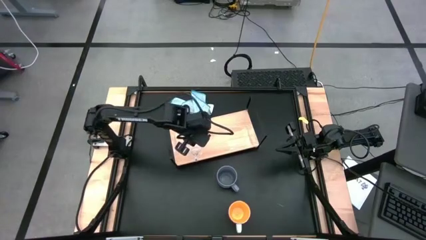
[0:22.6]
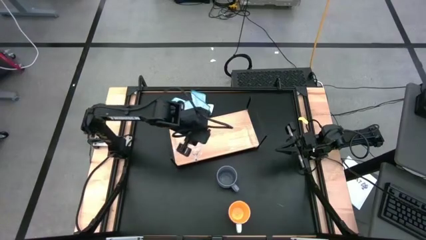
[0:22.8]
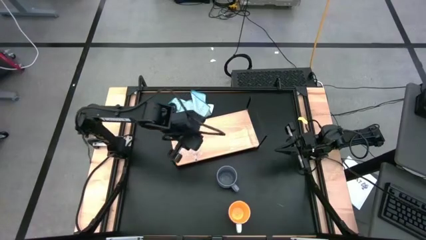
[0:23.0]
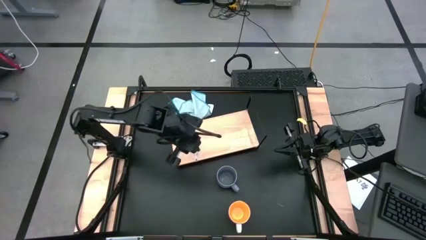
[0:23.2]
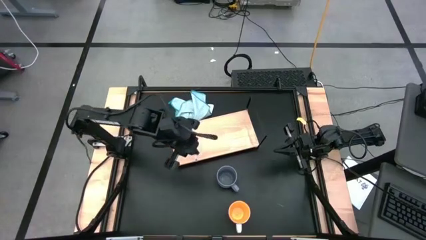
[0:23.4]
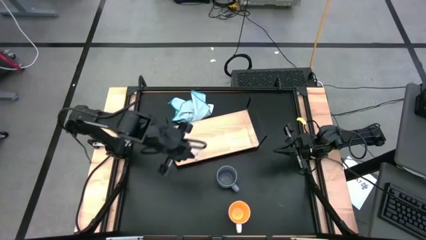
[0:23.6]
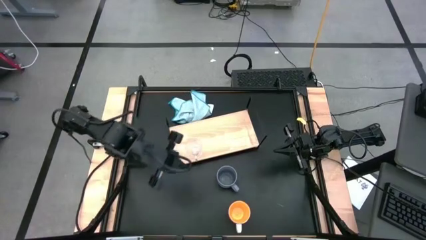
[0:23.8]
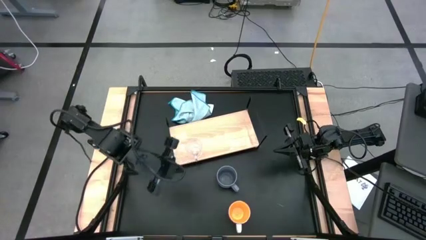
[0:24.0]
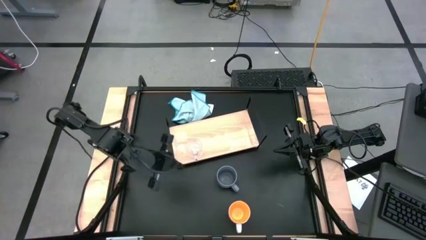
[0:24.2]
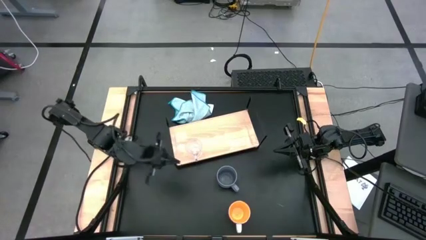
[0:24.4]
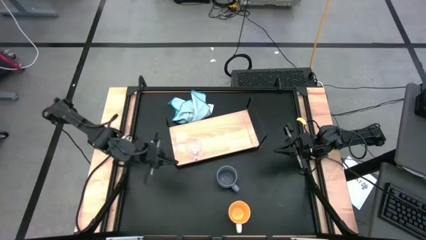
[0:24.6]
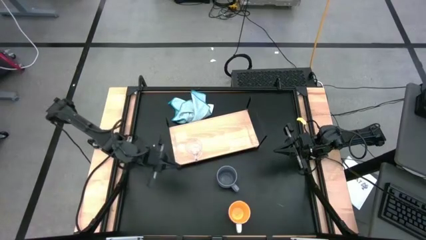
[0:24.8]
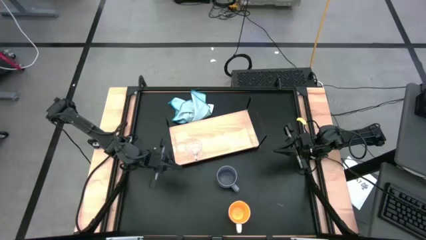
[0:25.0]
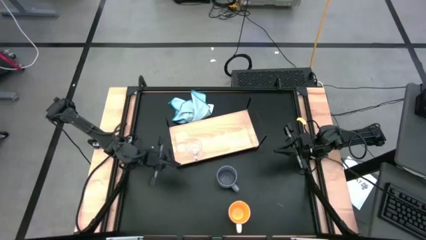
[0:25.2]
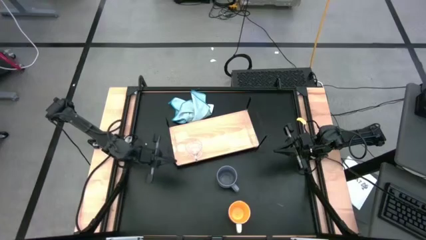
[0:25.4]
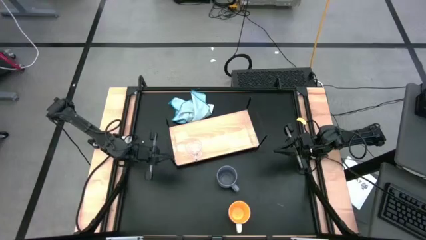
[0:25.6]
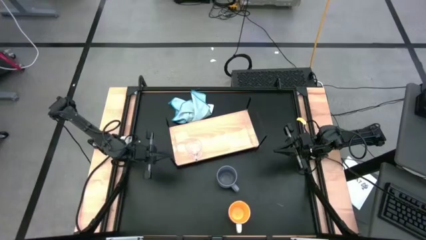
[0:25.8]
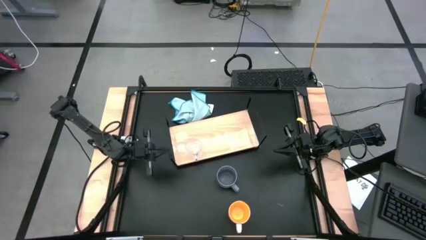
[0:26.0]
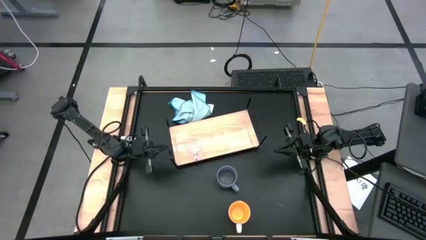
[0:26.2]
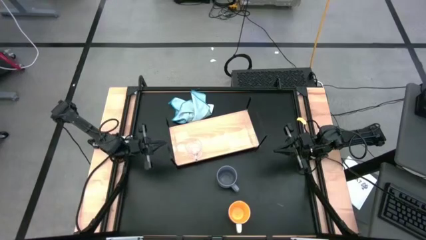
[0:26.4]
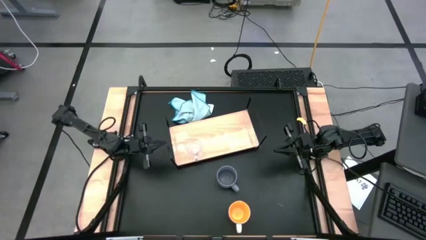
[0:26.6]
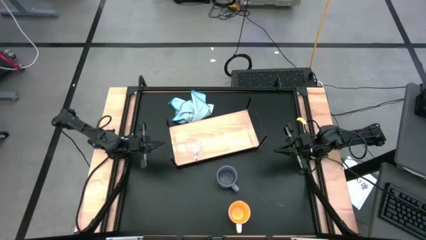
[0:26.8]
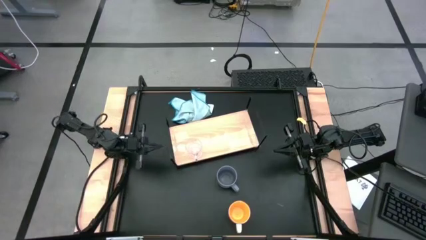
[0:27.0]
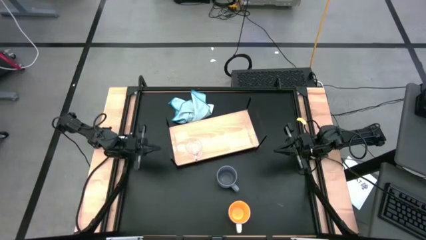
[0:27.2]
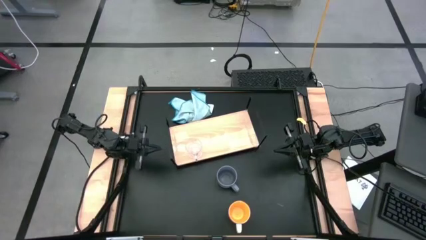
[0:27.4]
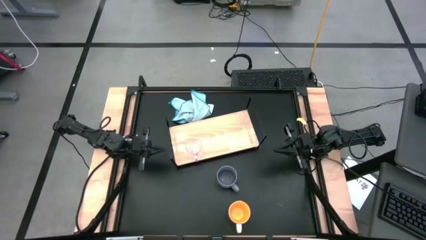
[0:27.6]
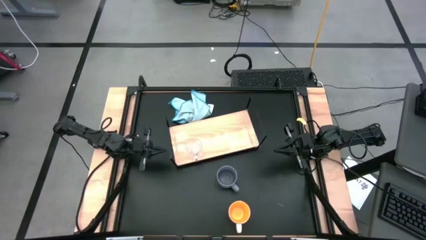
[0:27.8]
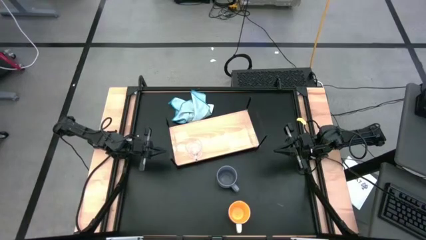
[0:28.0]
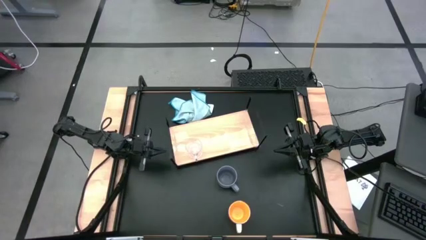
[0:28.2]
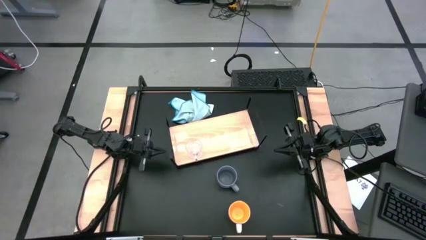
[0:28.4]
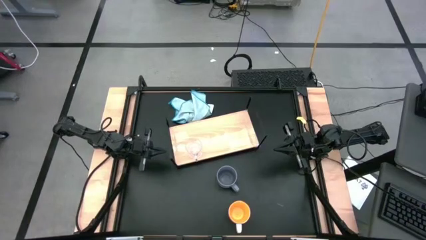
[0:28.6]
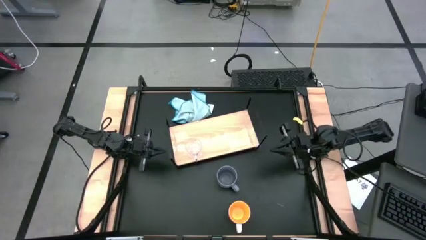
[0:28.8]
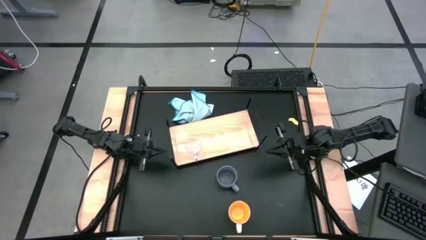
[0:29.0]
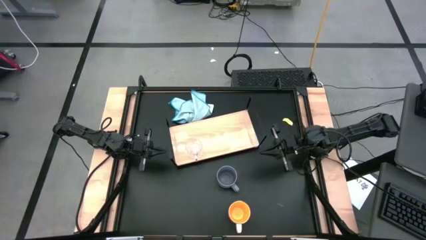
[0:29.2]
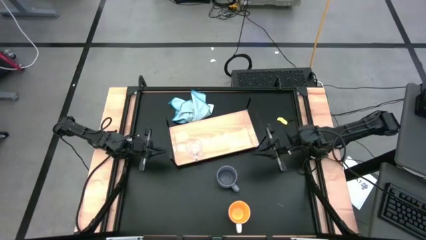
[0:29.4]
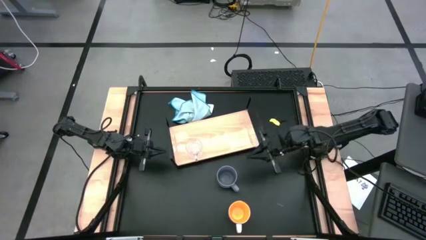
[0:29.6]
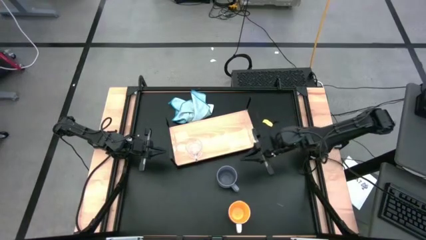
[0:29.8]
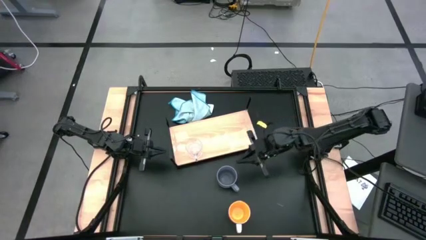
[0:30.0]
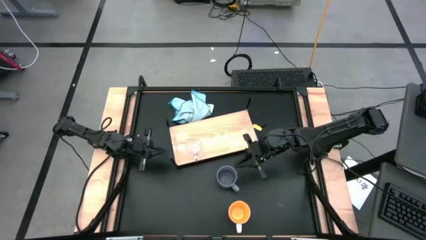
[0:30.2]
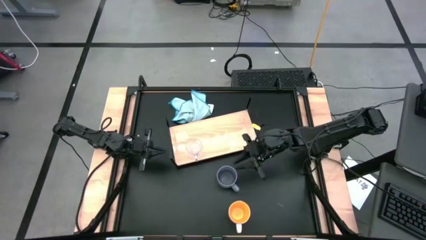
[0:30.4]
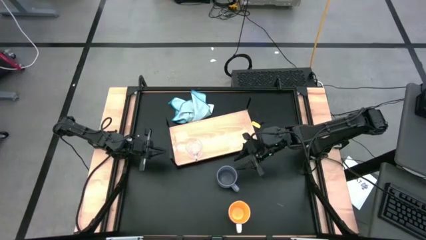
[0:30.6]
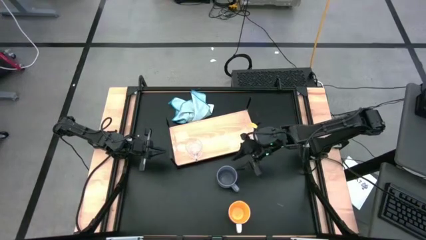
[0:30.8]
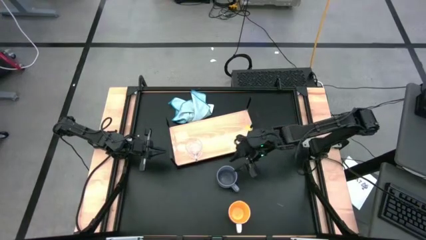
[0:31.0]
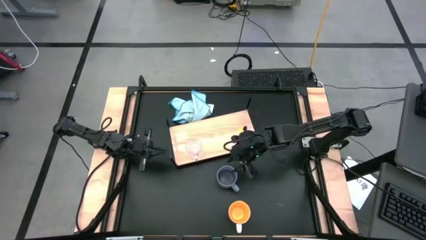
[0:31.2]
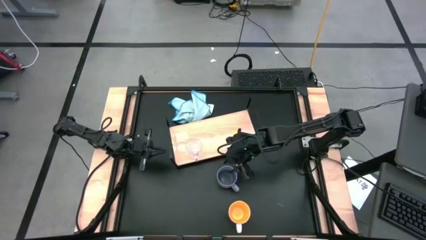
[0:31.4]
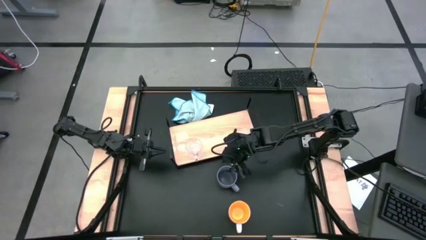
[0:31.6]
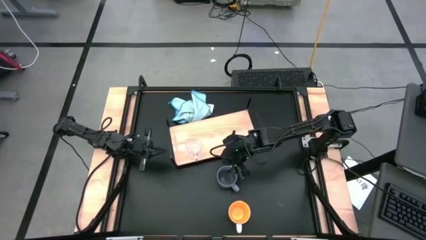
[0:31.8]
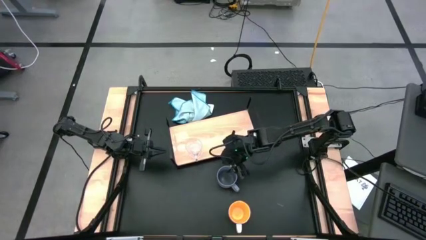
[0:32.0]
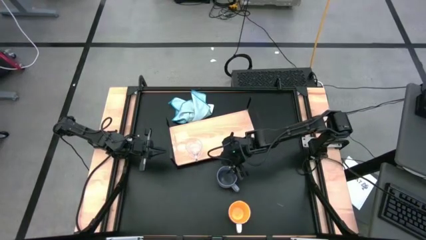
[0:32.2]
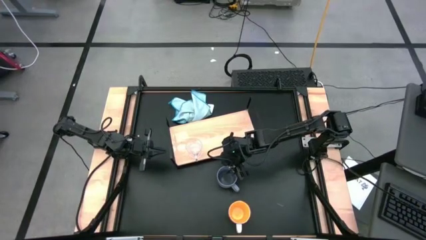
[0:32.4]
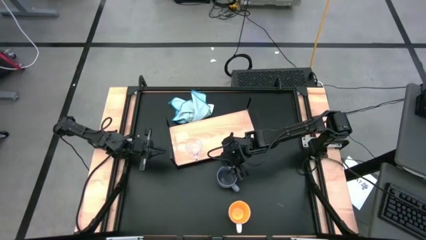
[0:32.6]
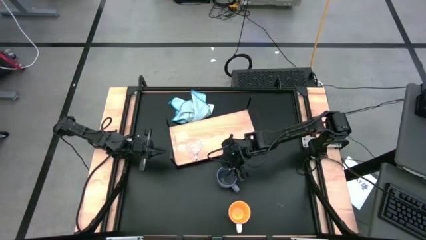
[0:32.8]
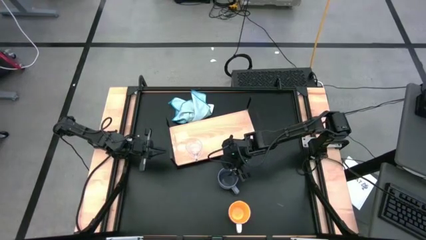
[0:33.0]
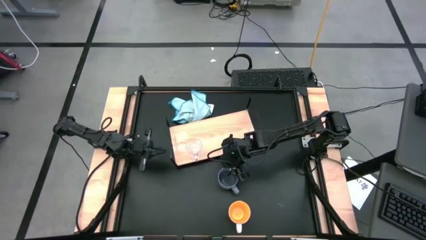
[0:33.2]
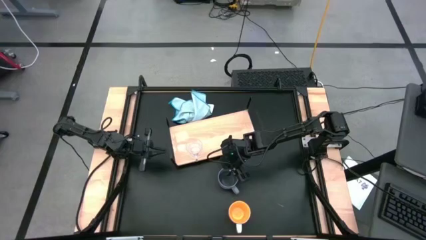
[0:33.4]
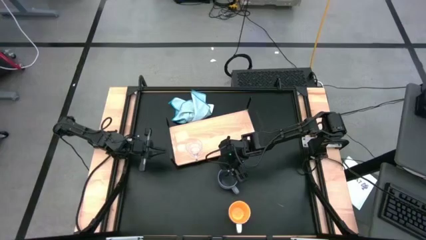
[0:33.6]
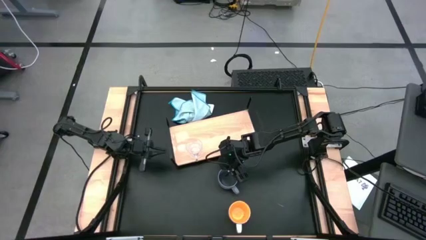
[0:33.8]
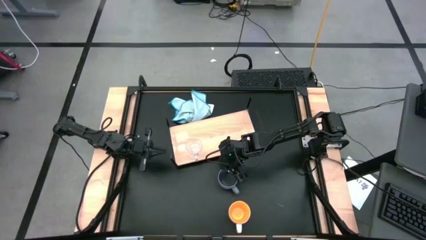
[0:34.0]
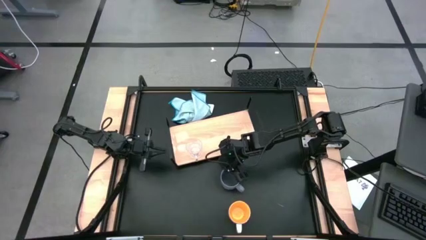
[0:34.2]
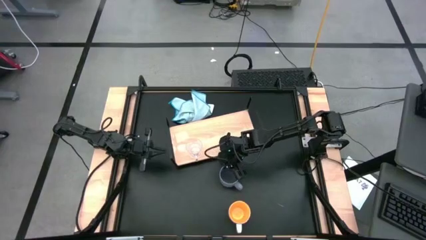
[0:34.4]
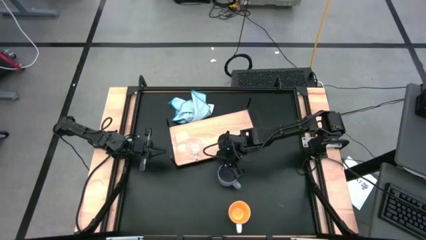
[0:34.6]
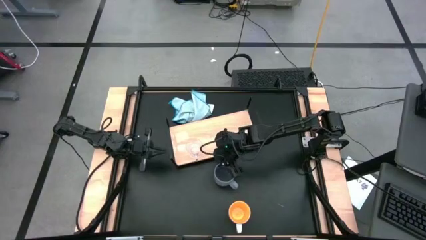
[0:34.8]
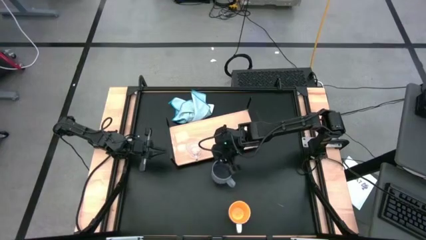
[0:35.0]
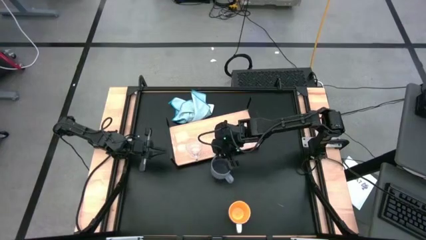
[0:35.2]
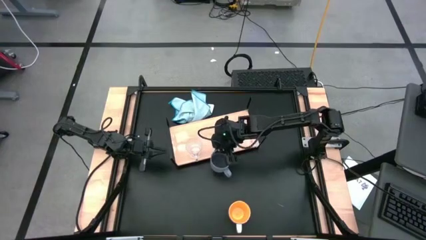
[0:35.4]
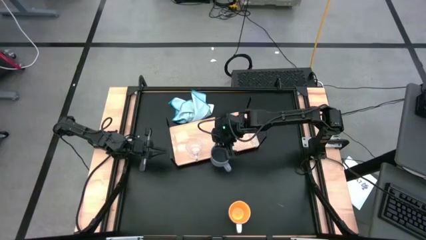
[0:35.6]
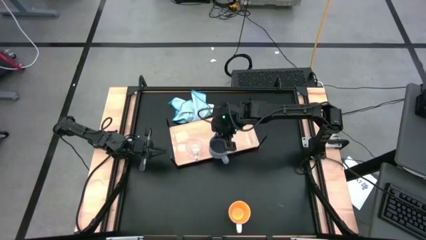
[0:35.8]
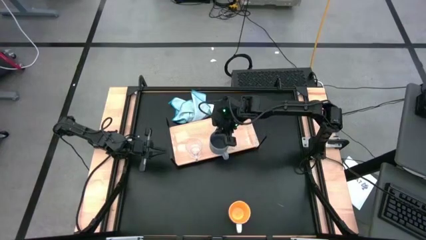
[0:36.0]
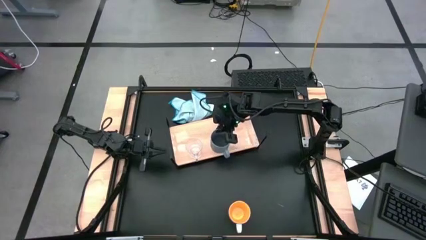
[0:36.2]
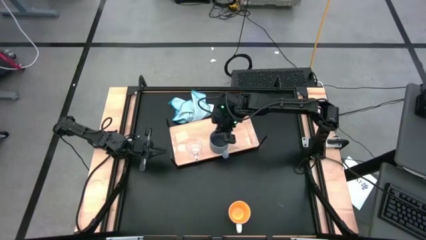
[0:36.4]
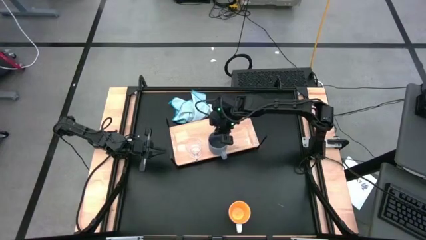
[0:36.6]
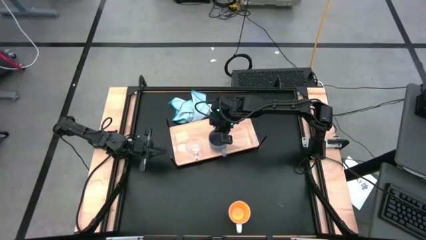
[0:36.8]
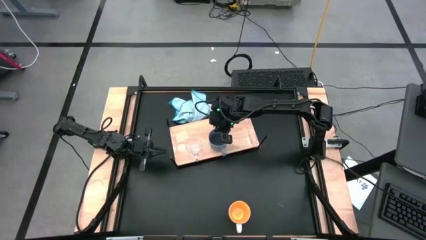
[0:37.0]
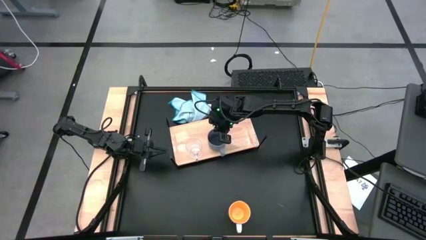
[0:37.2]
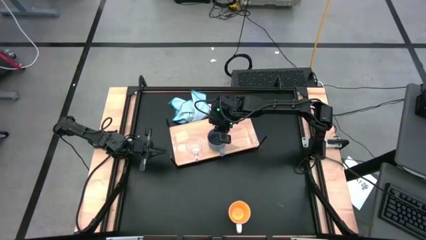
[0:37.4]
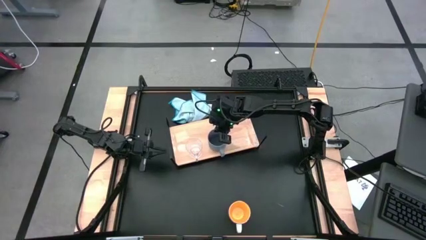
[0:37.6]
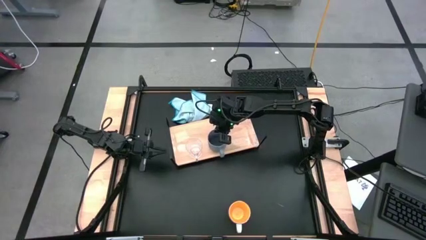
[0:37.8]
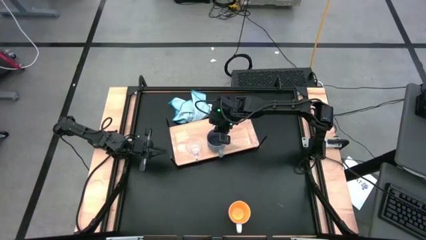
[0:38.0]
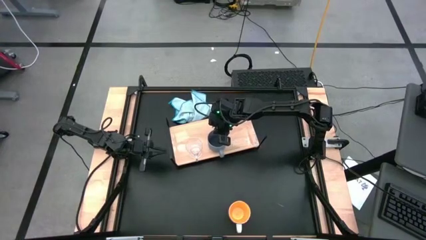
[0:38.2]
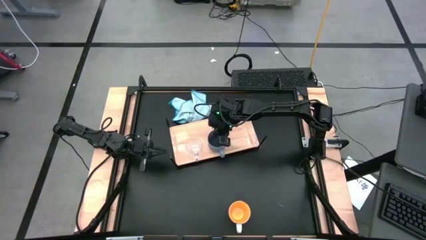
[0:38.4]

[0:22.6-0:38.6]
Task: Stack small to large cups/mugs on shelf
Put the gray mug on the shelf
